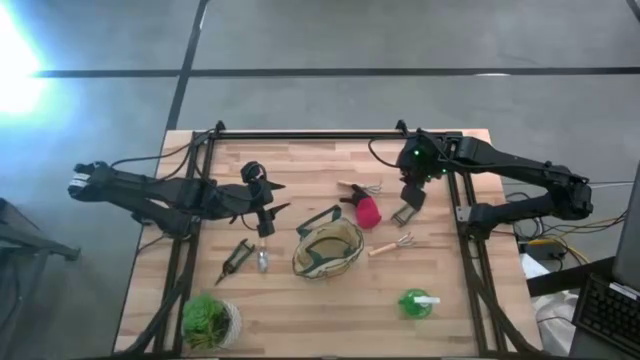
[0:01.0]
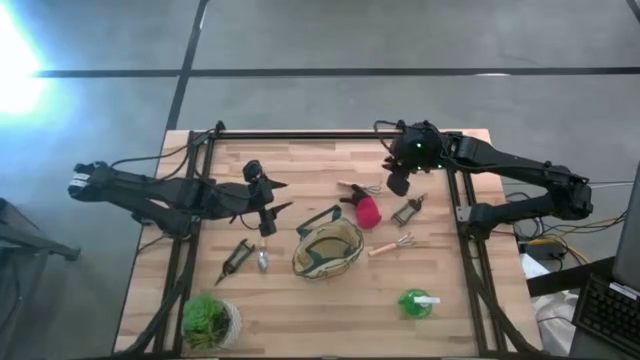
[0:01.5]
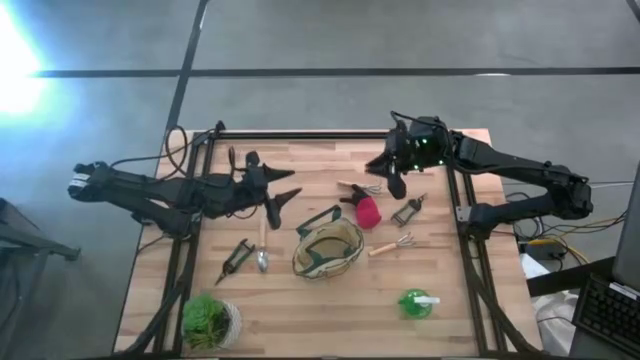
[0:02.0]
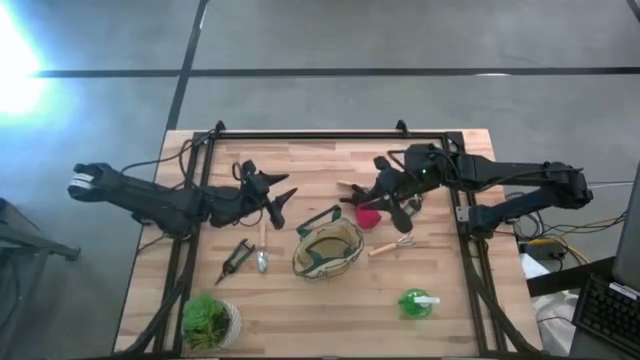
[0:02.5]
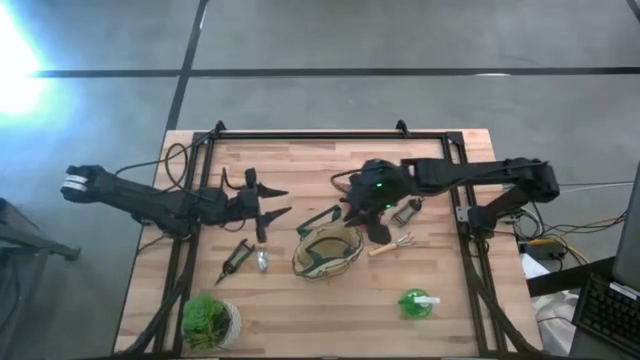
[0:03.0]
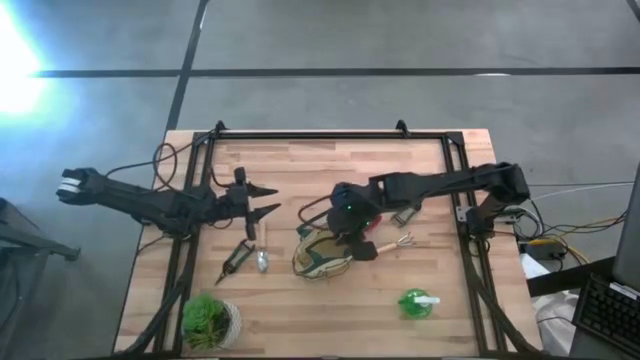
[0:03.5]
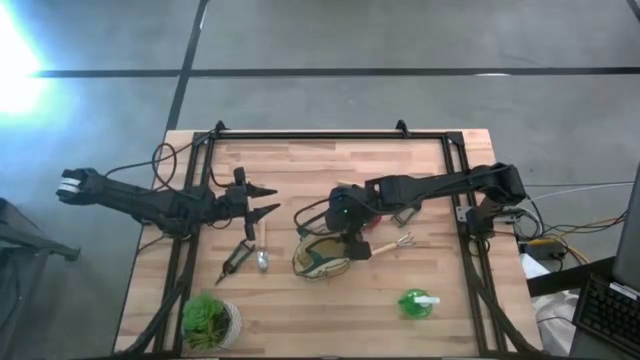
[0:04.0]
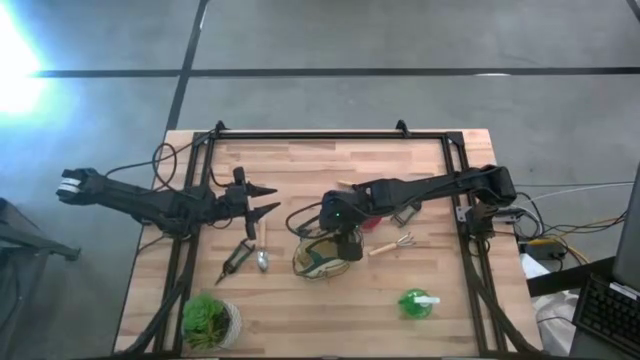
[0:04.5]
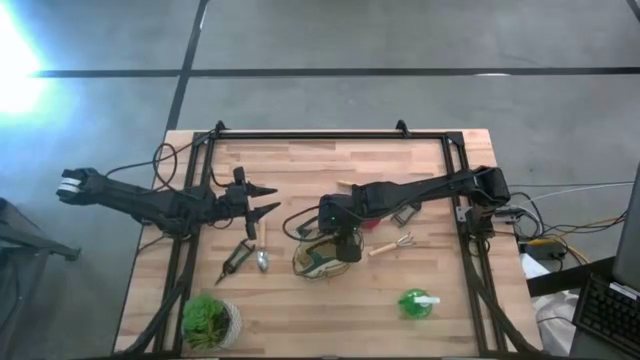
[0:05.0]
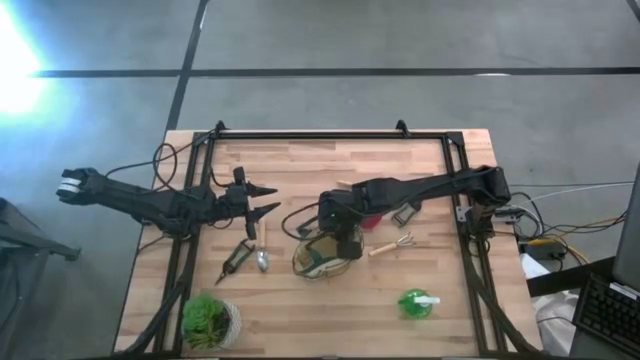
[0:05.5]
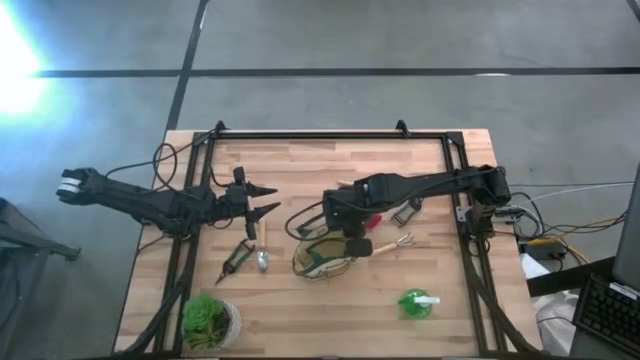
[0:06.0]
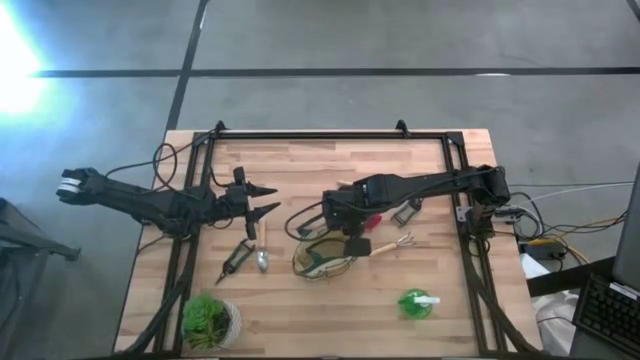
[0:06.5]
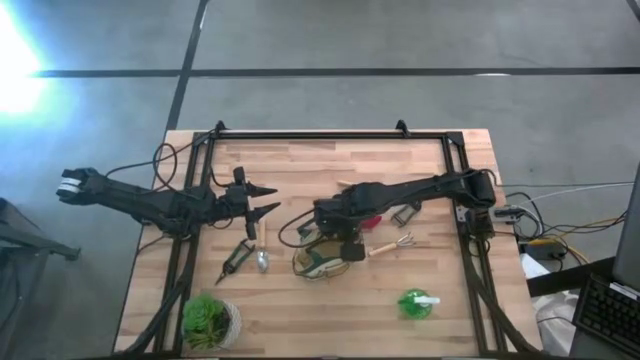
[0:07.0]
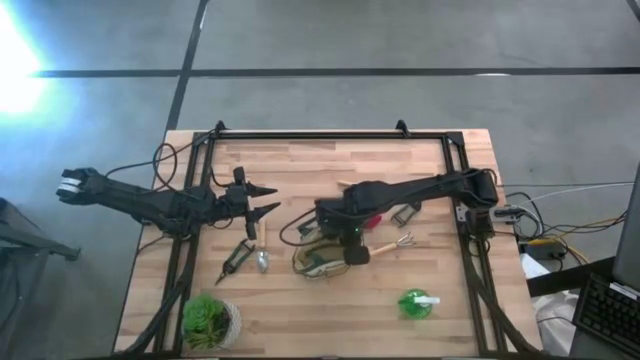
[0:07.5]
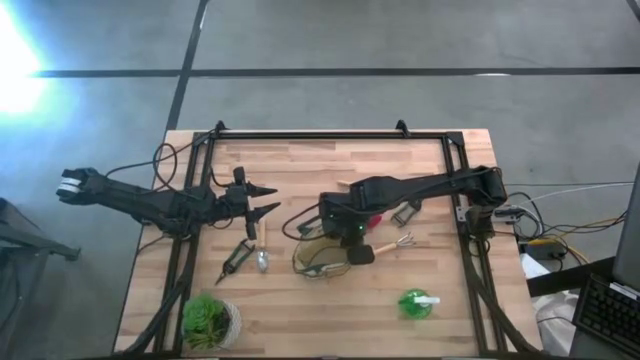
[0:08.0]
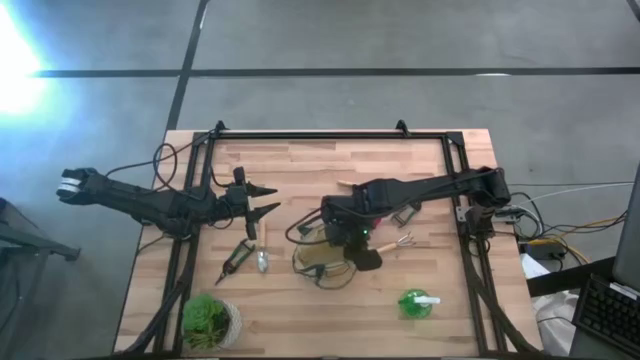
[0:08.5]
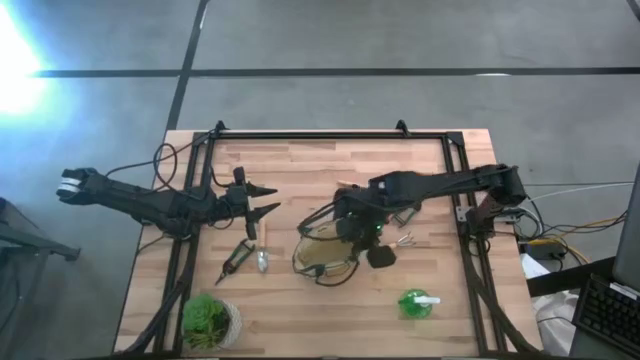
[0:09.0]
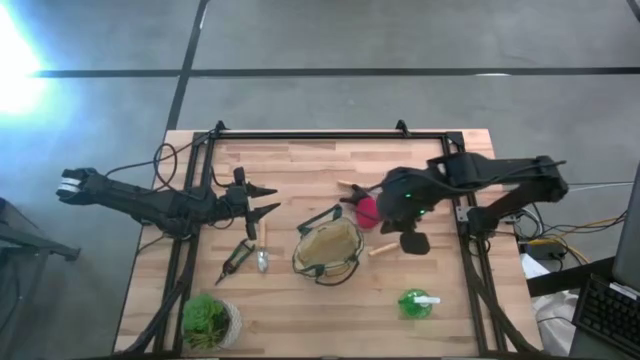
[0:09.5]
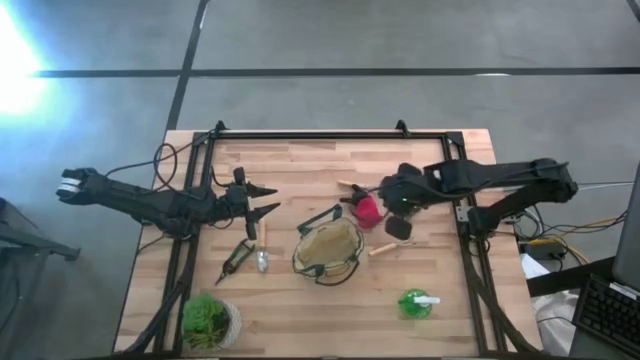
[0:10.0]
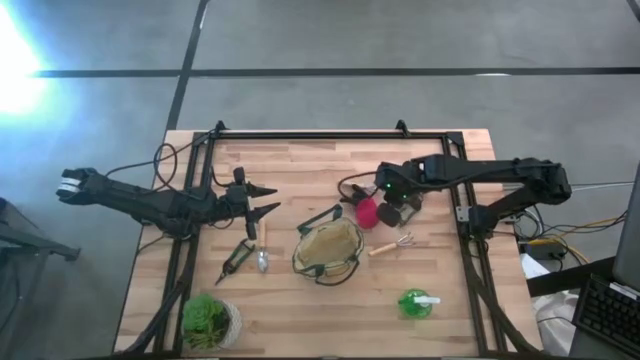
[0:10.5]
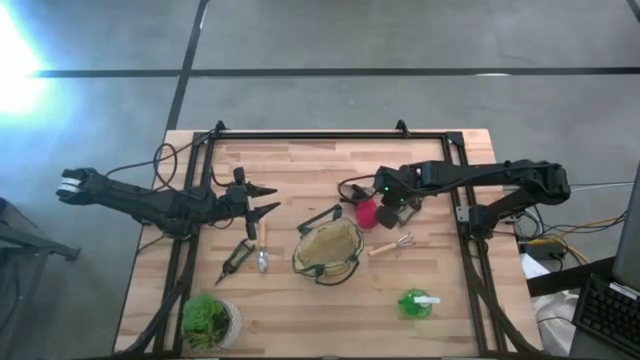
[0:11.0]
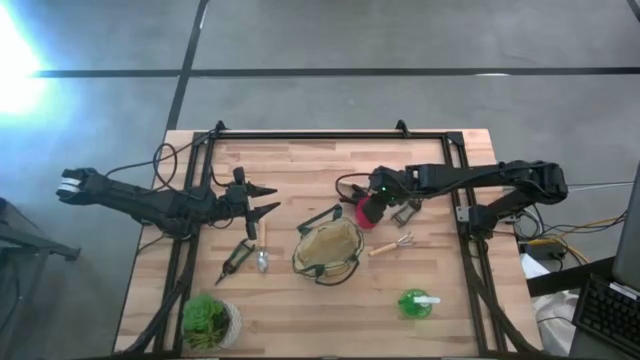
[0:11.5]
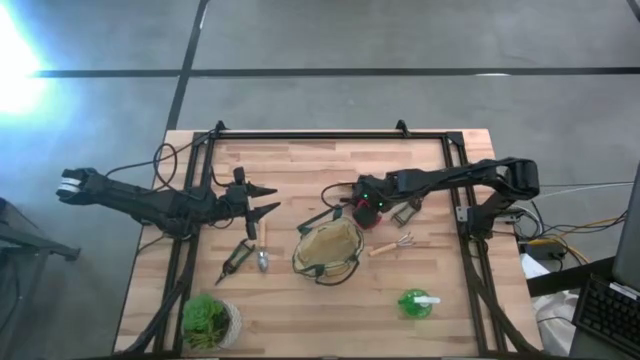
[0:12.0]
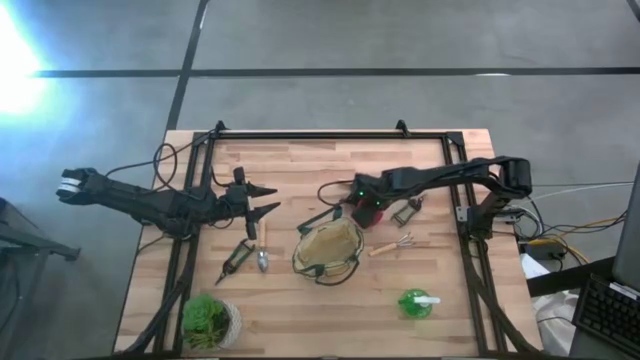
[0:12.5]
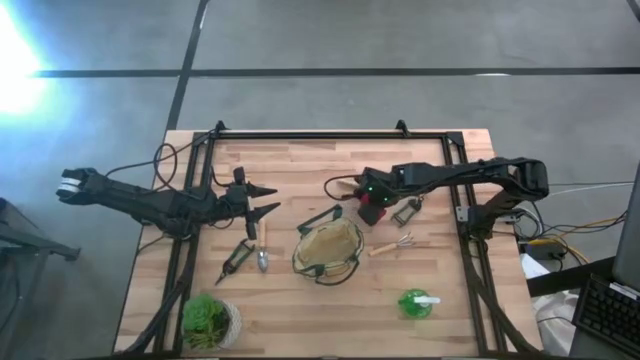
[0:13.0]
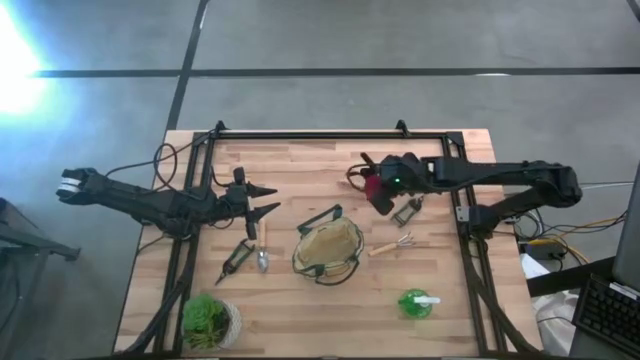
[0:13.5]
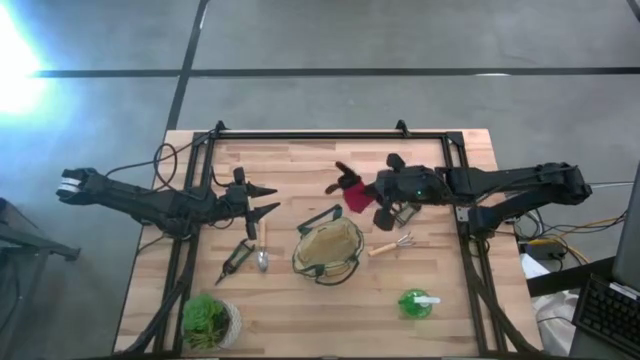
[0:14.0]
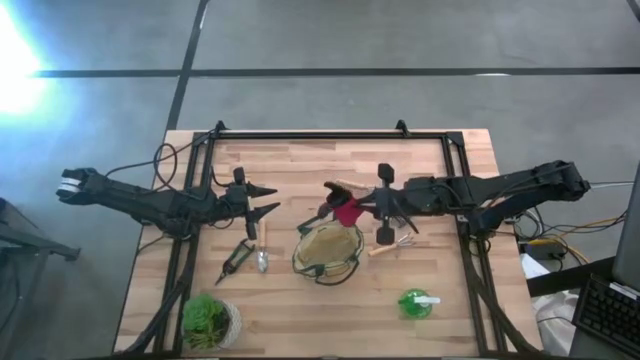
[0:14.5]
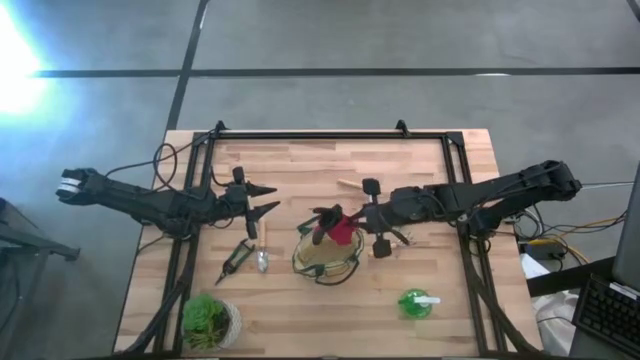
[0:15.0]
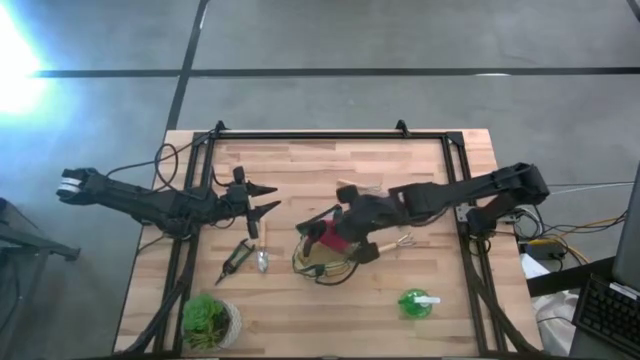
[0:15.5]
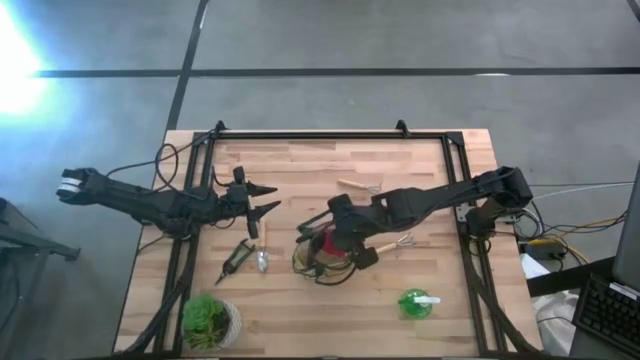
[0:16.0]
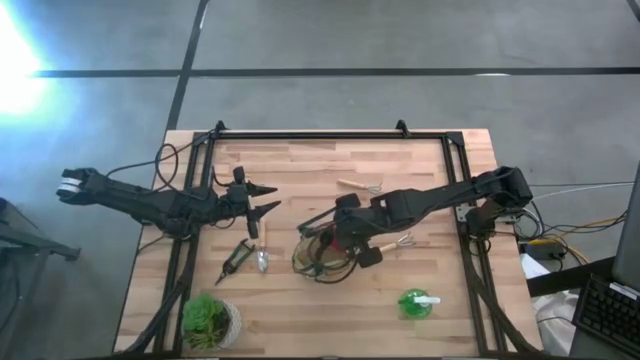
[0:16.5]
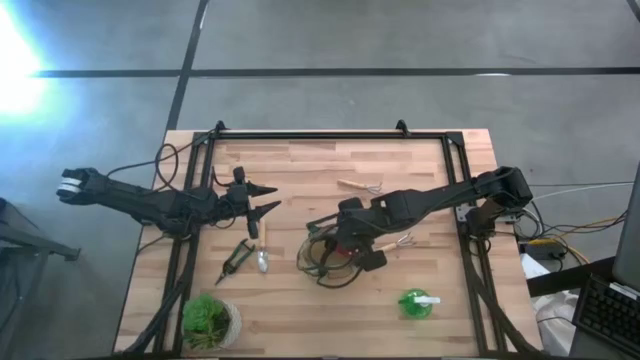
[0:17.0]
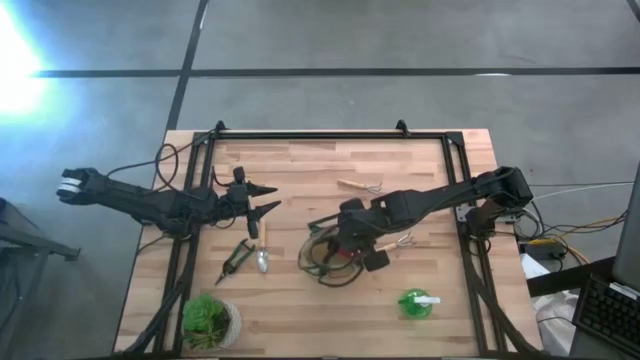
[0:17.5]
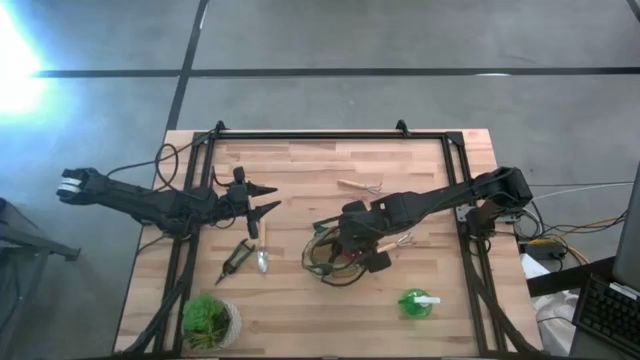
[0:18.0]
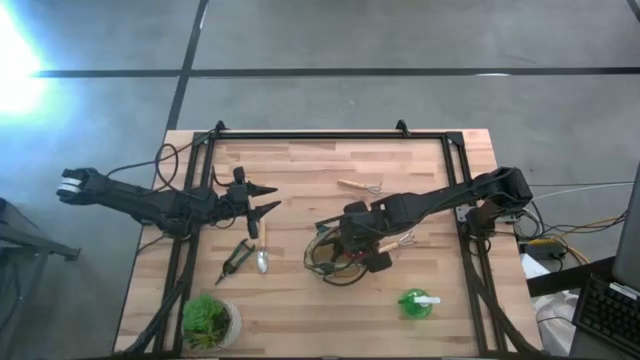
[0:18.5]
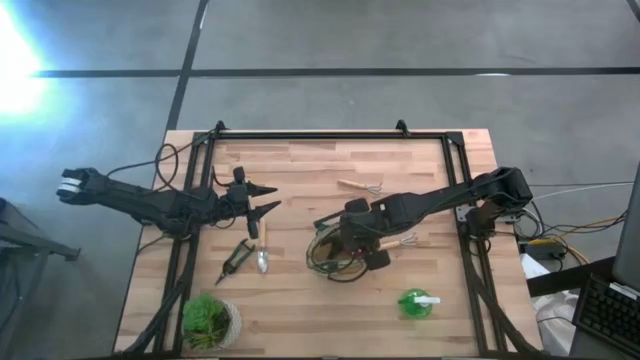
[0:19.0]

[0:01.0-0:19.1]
Task: Pick & Place Garden tools in Gardening bag
Put the red gloves into the gardening bag
